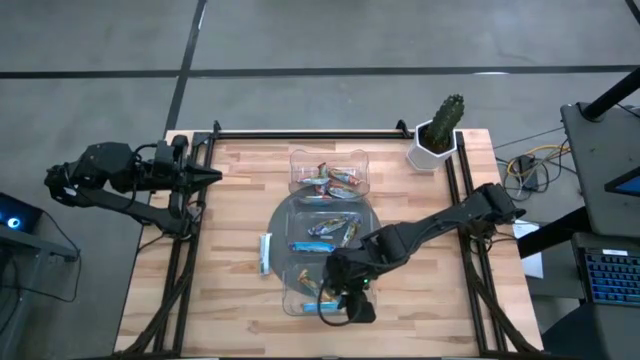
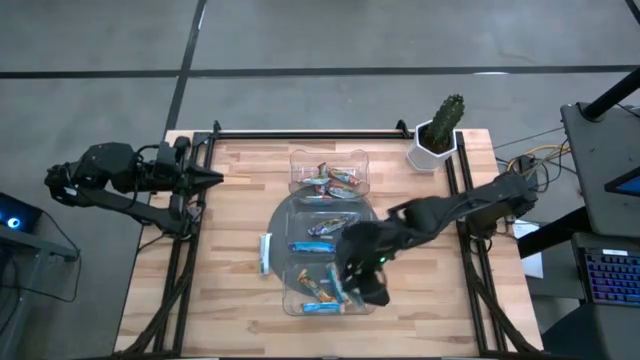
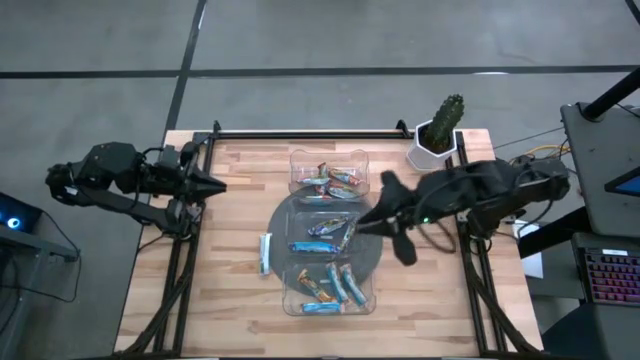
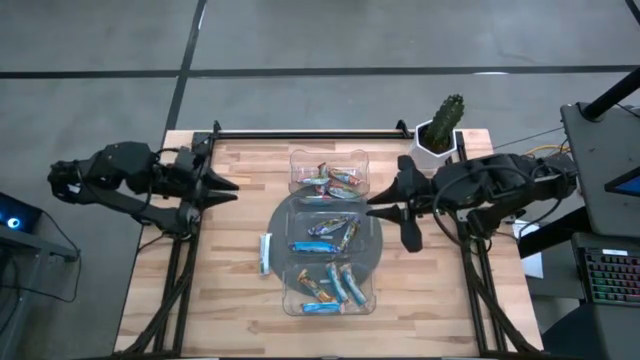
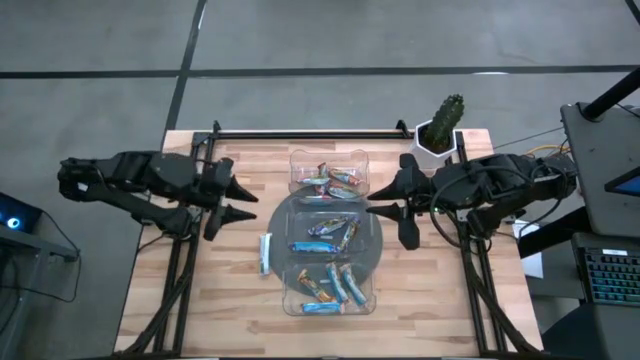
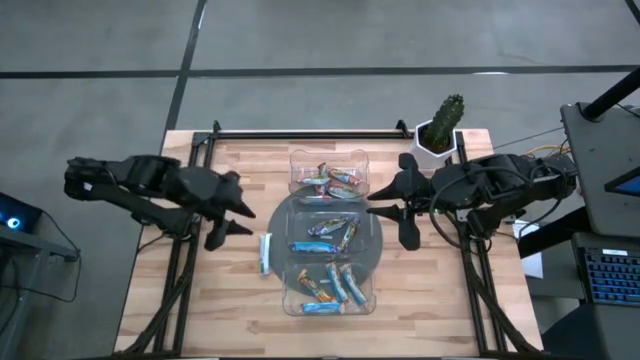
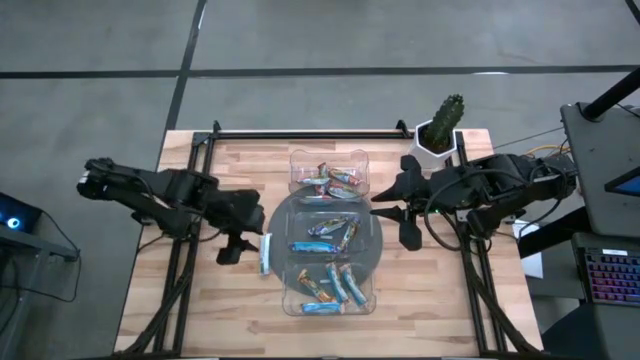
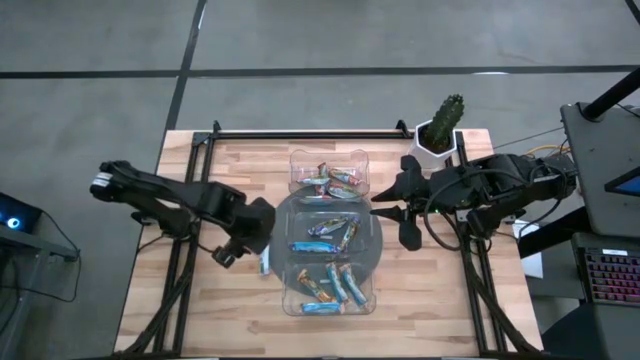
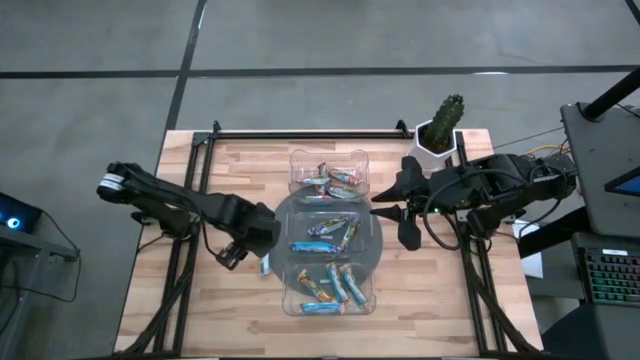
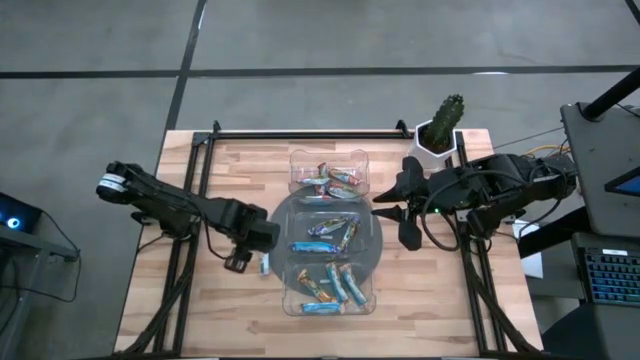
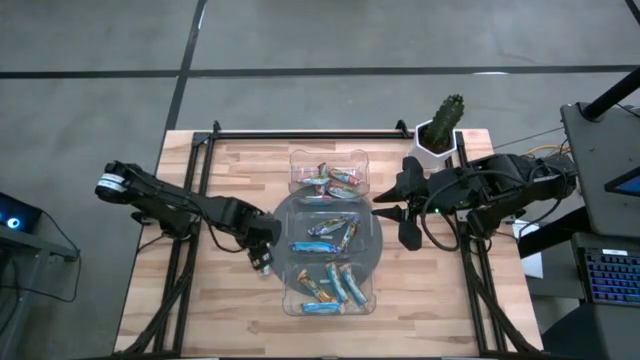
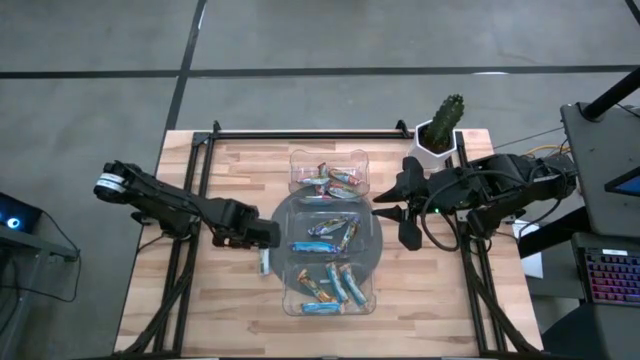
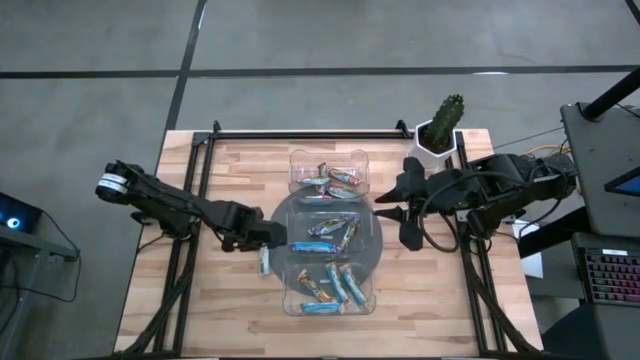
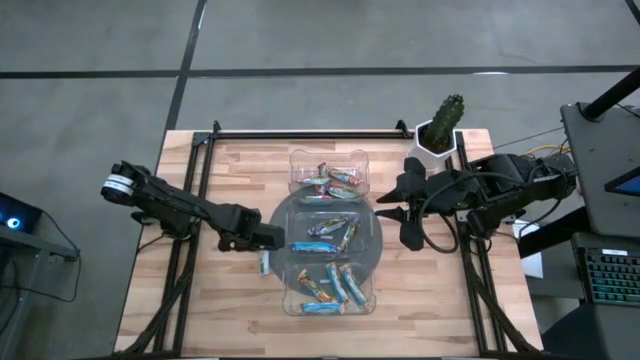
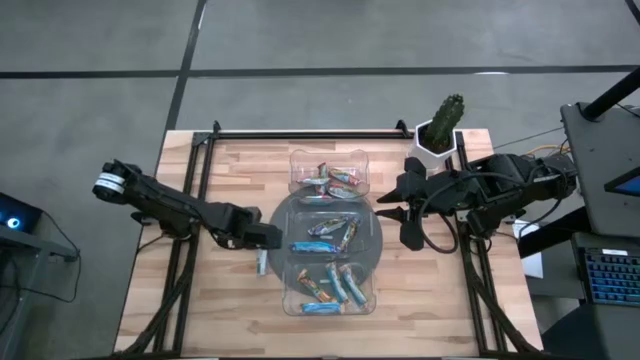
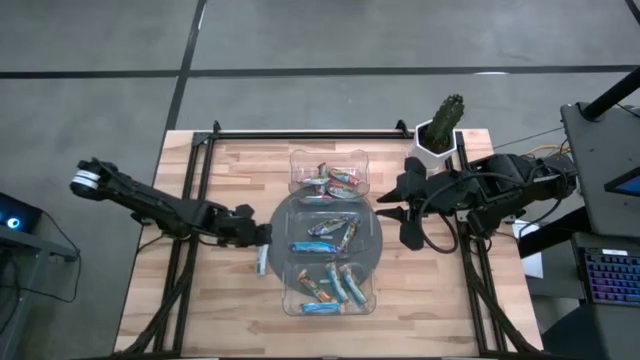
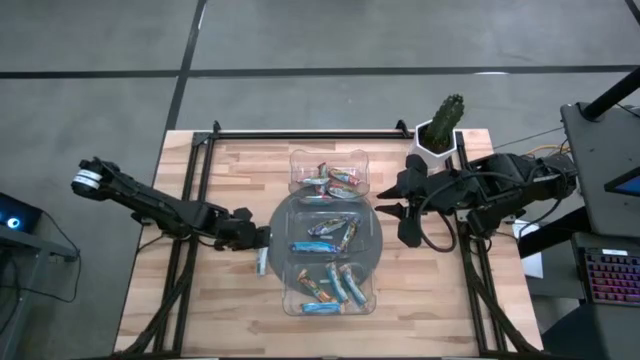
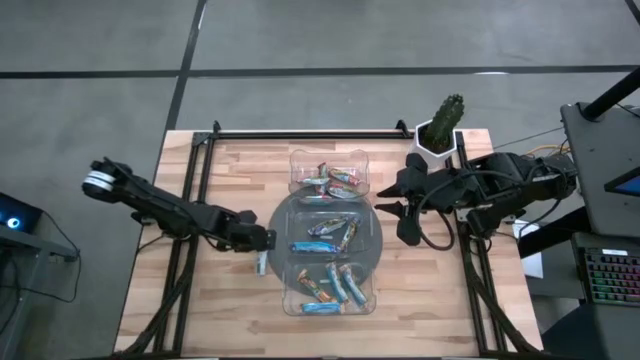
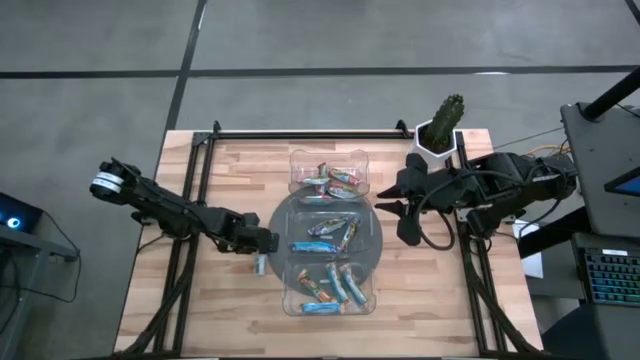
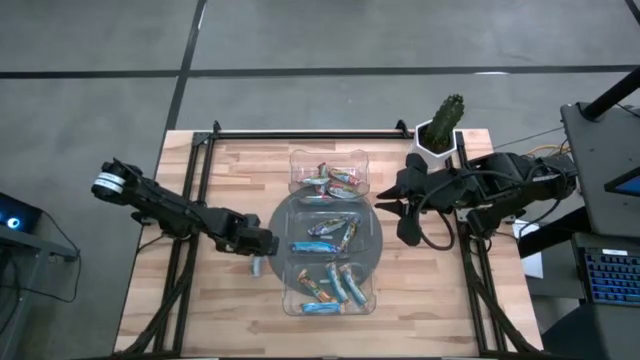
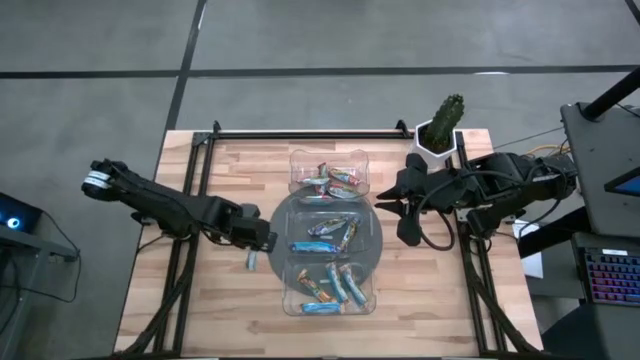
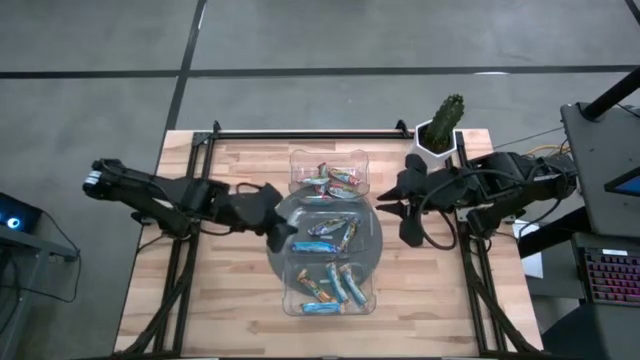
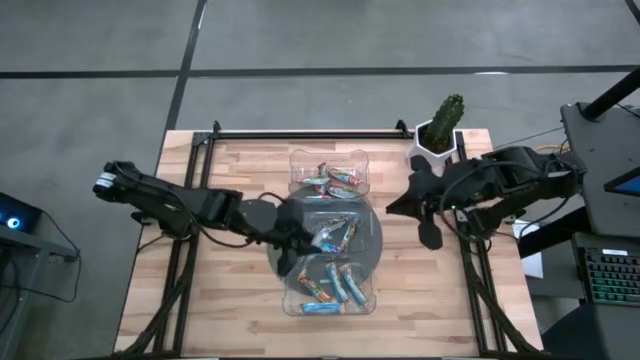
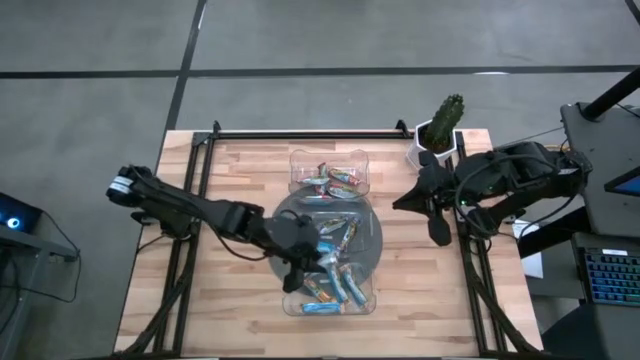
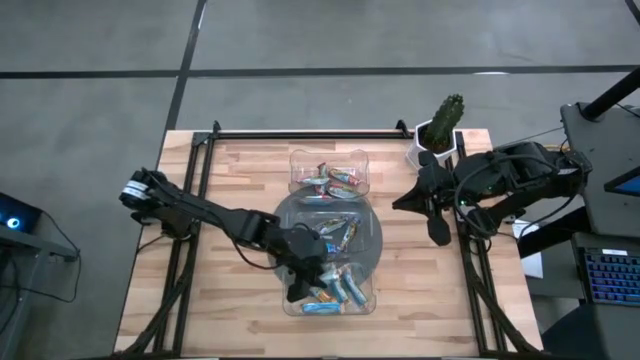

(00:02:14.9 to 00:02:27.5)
Task: Pick and place Granola Bars by type
Put the yellow granola bar into the bottom transparent bin

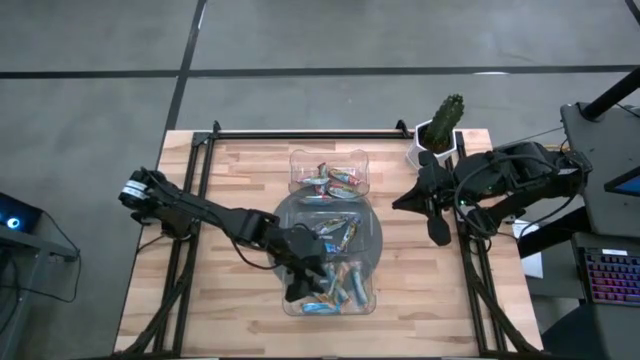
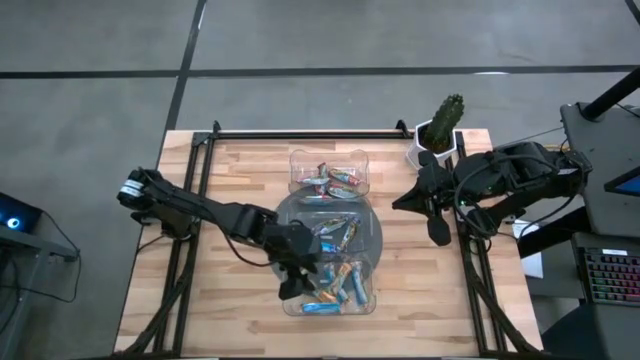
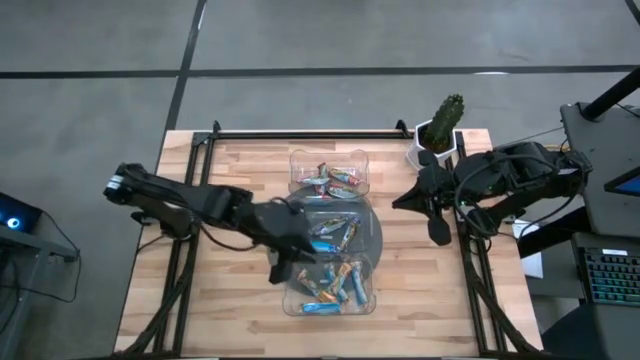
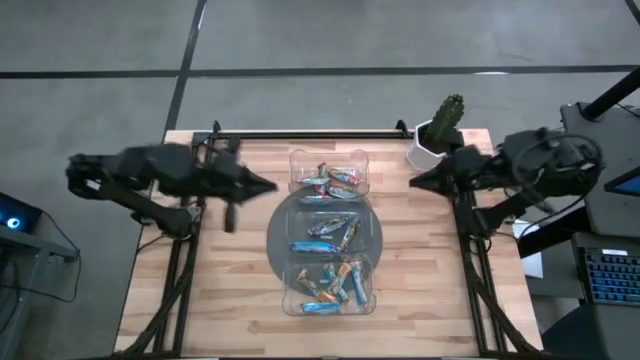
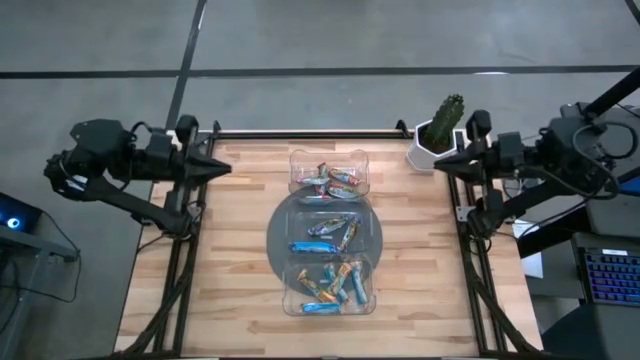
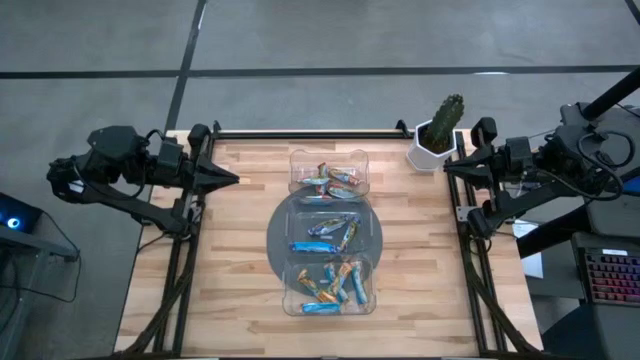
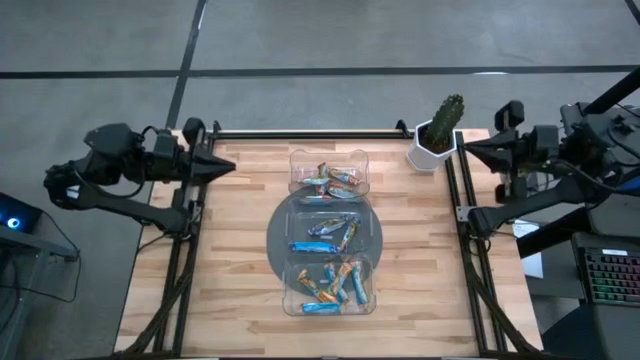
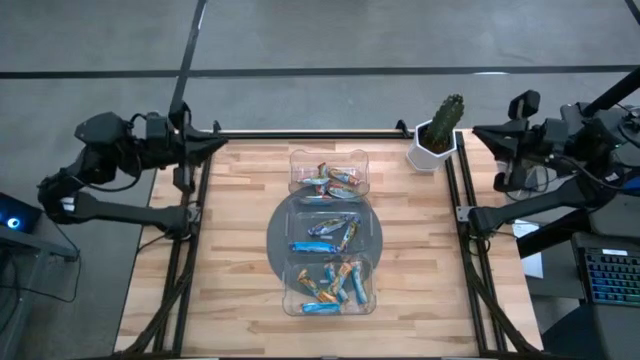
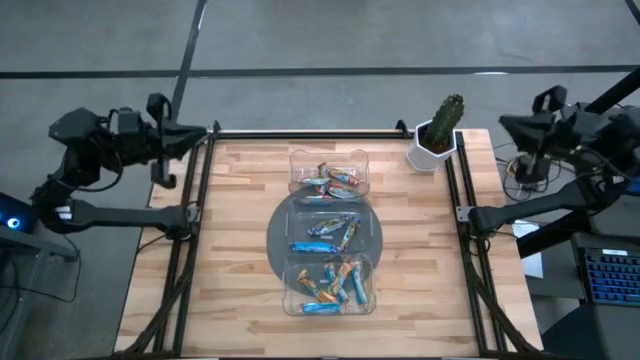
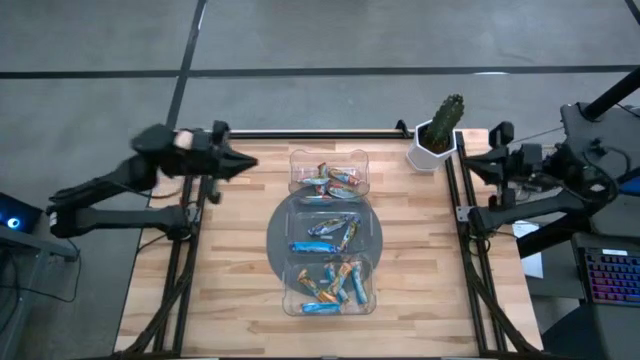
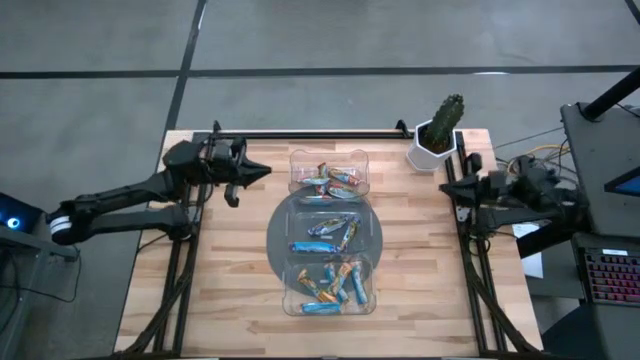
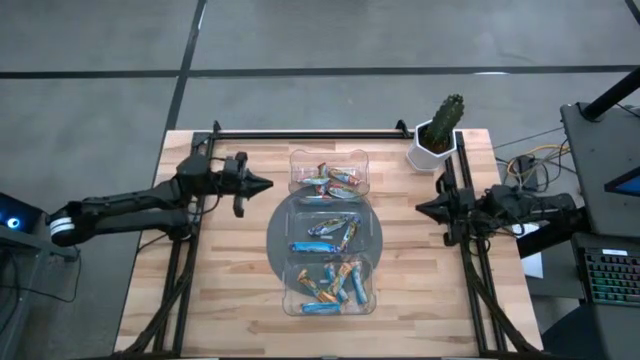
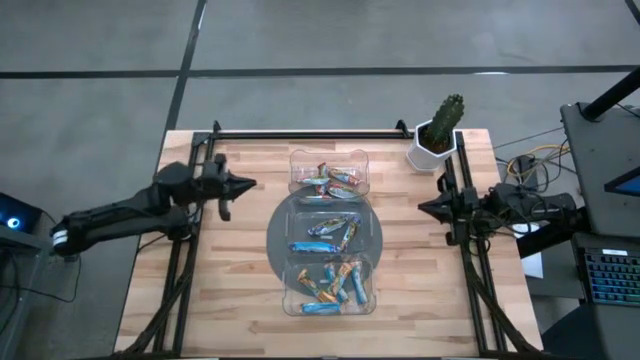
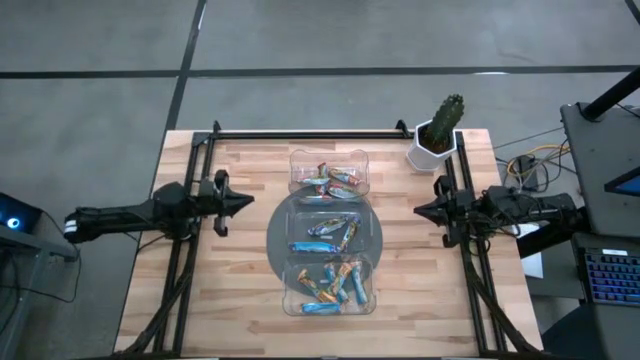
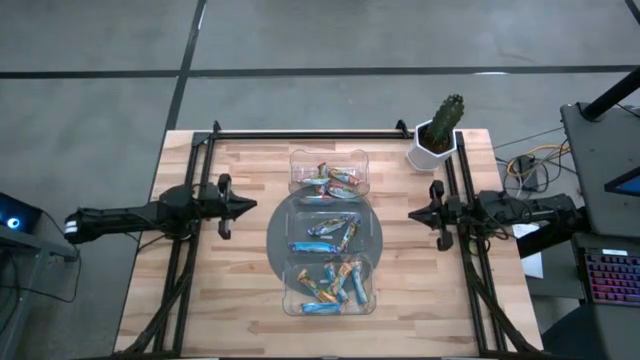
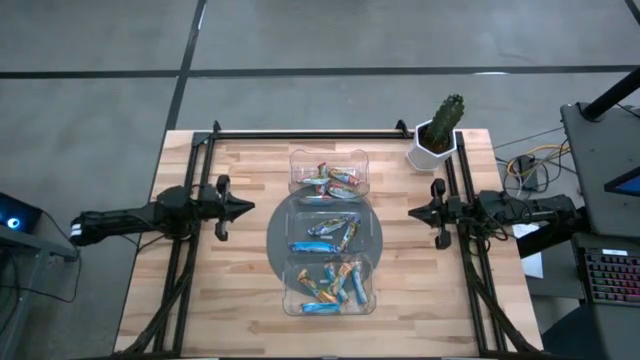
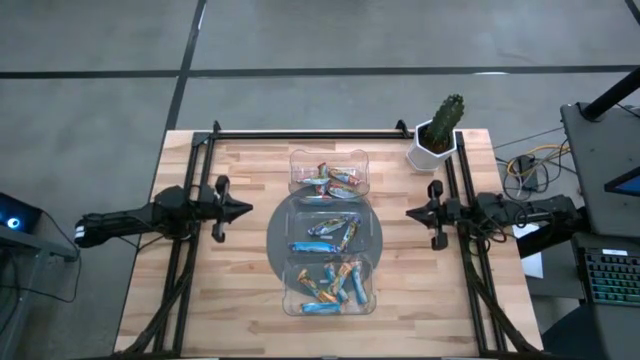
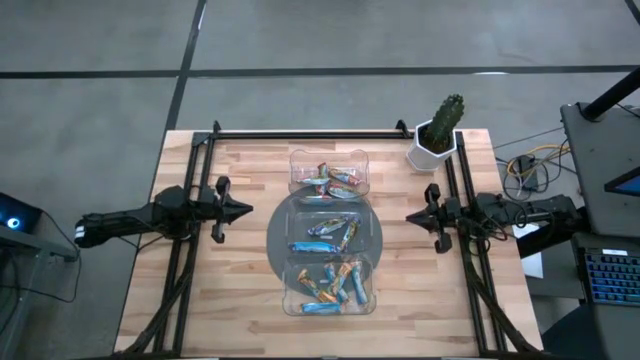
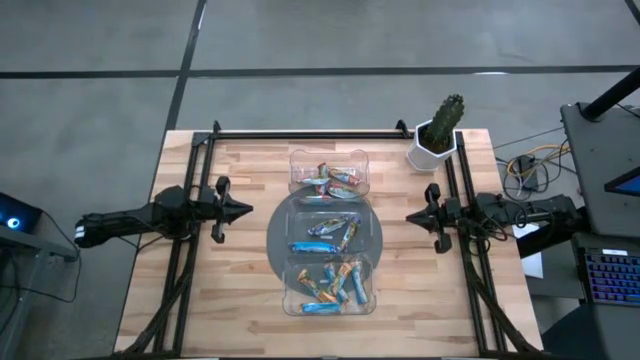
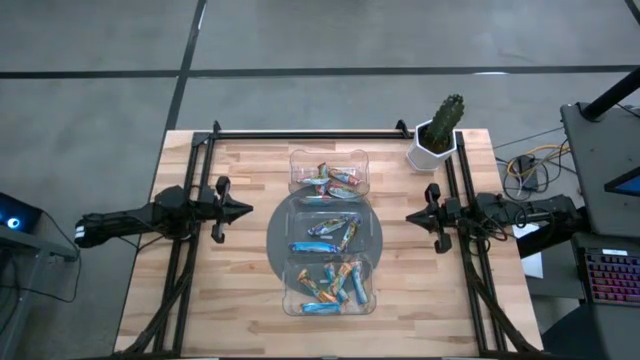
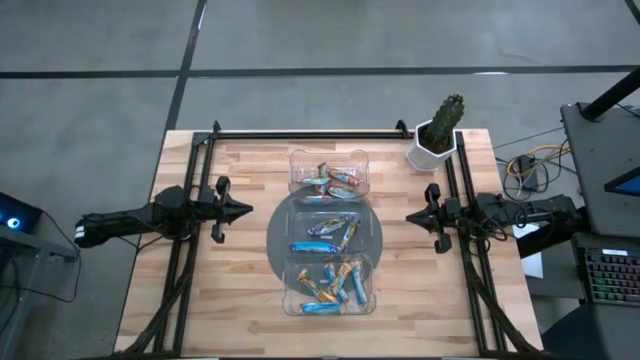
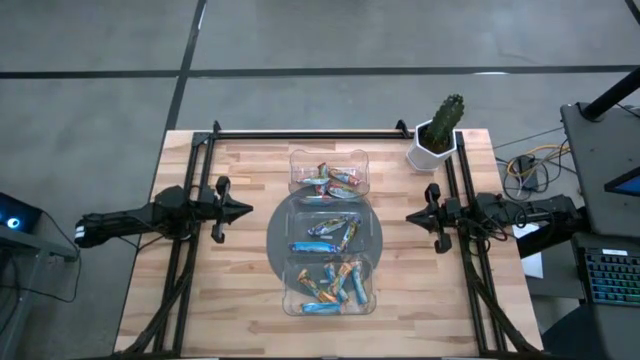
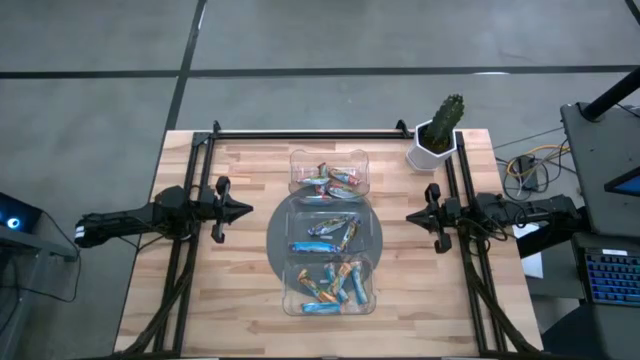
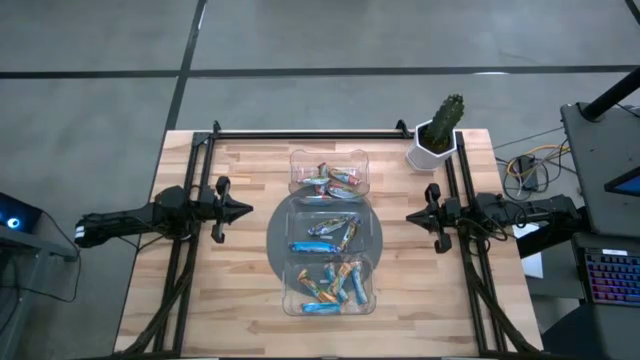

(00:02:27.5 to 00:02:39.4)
Return to Home Position
